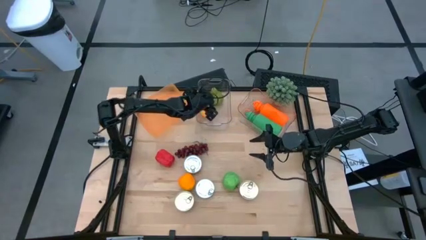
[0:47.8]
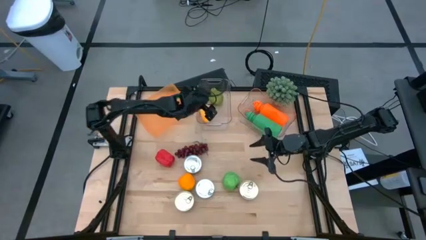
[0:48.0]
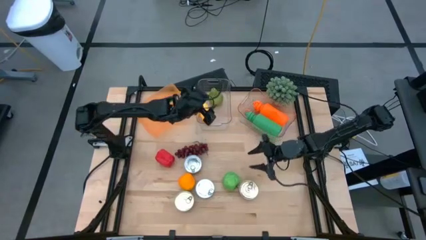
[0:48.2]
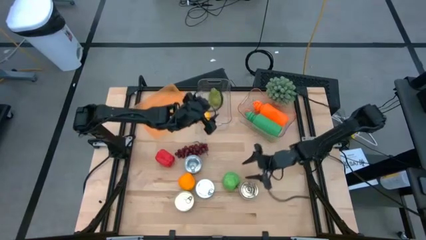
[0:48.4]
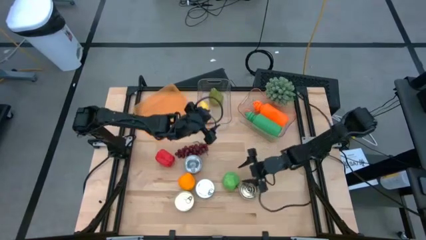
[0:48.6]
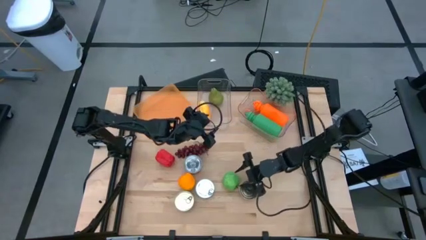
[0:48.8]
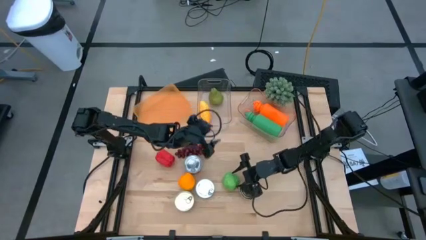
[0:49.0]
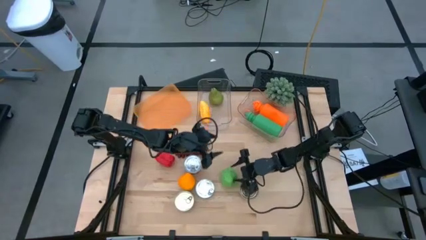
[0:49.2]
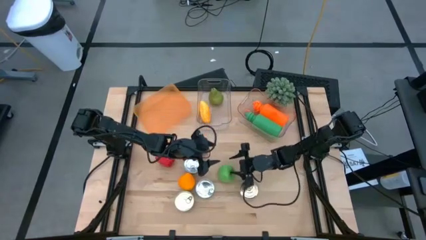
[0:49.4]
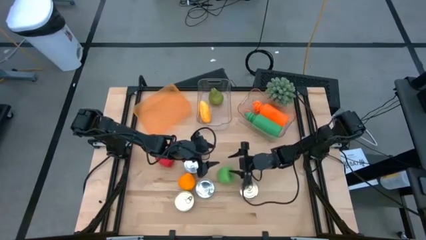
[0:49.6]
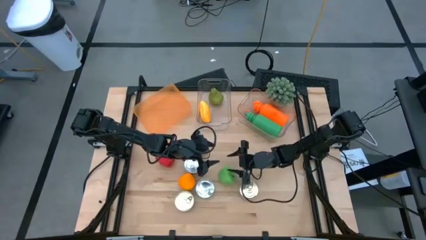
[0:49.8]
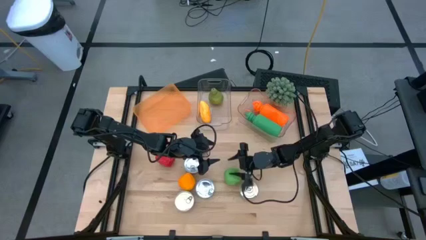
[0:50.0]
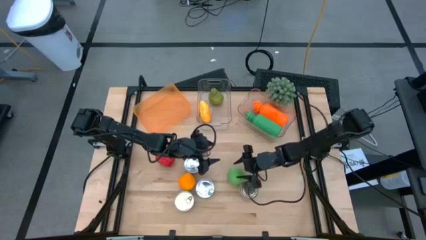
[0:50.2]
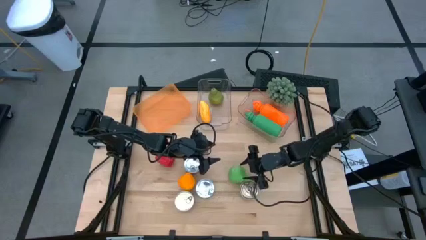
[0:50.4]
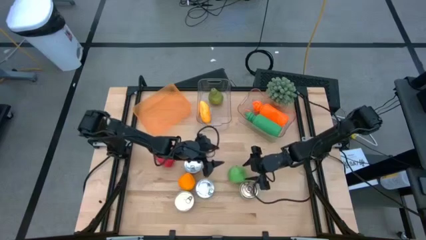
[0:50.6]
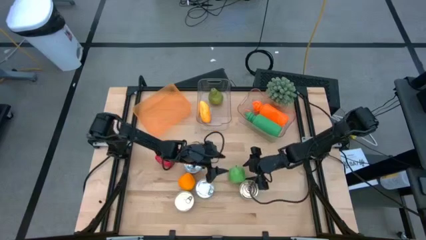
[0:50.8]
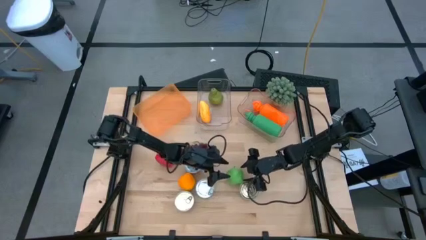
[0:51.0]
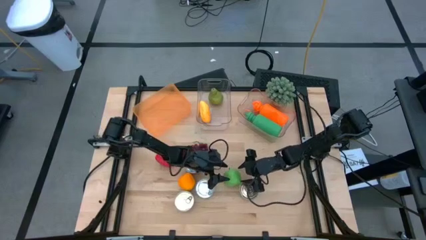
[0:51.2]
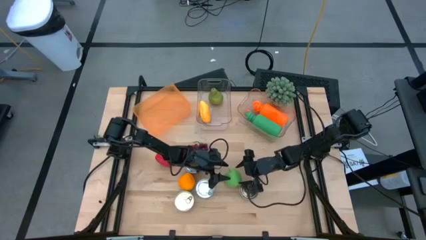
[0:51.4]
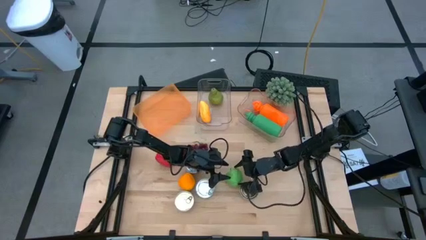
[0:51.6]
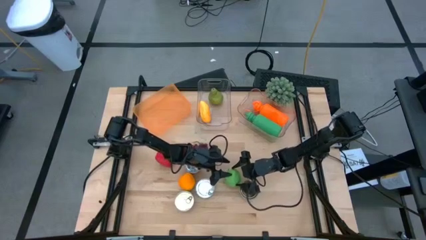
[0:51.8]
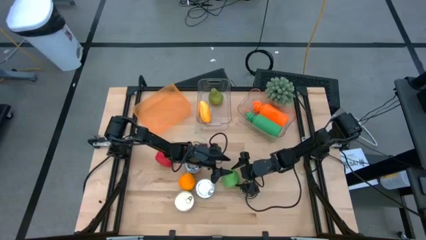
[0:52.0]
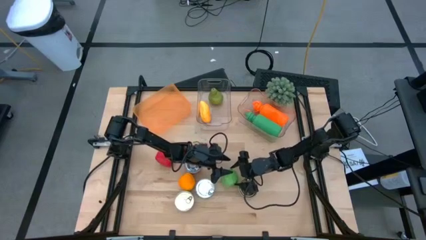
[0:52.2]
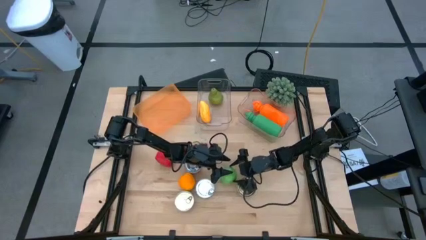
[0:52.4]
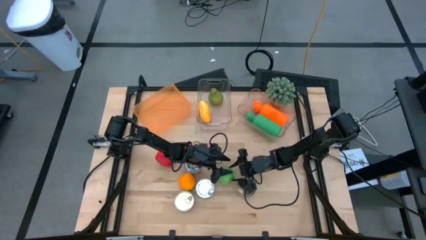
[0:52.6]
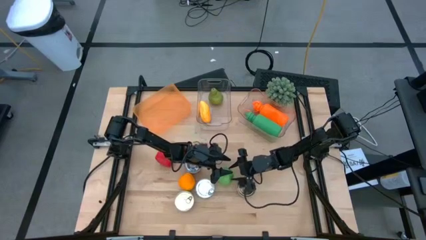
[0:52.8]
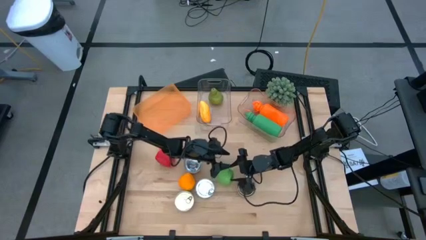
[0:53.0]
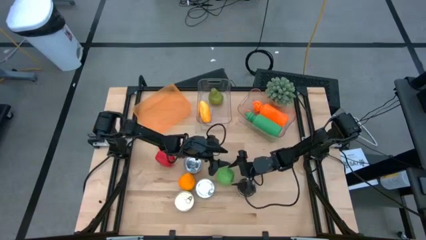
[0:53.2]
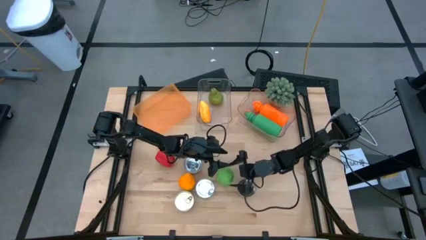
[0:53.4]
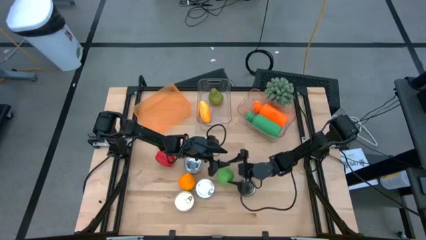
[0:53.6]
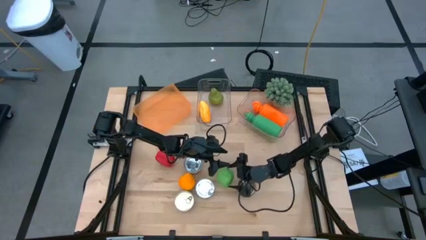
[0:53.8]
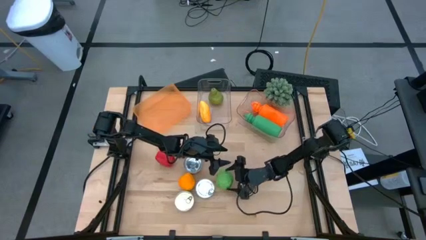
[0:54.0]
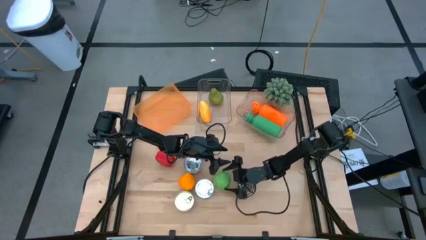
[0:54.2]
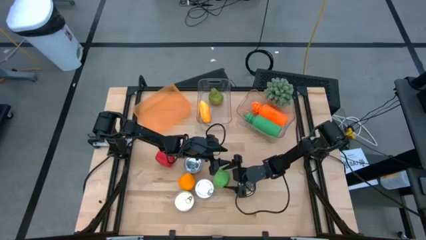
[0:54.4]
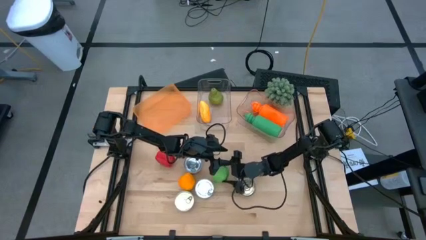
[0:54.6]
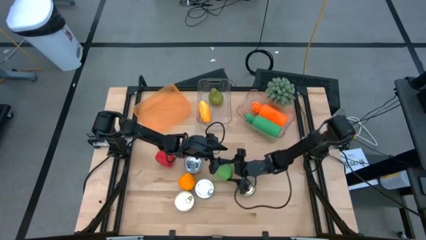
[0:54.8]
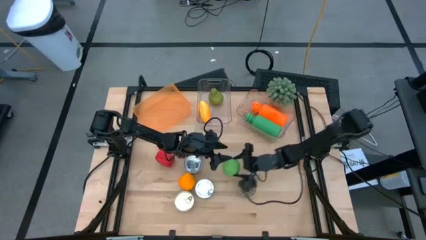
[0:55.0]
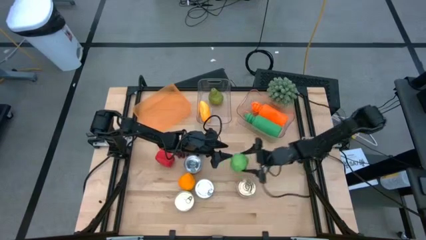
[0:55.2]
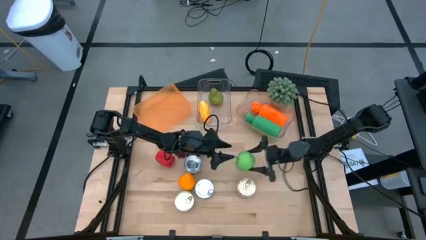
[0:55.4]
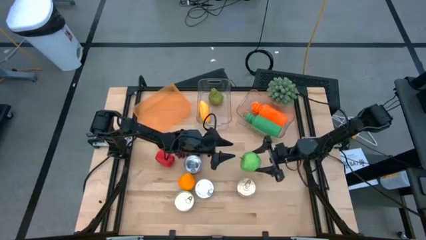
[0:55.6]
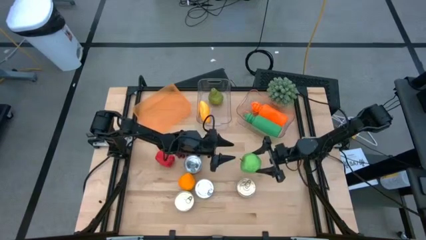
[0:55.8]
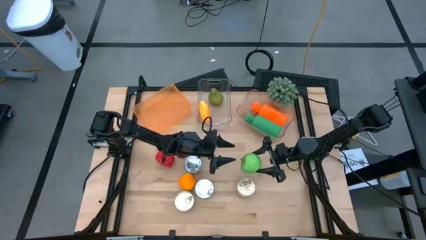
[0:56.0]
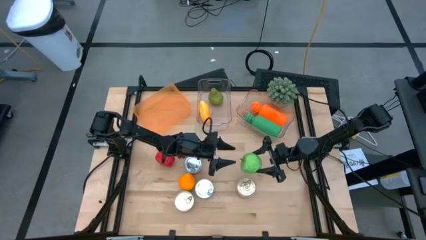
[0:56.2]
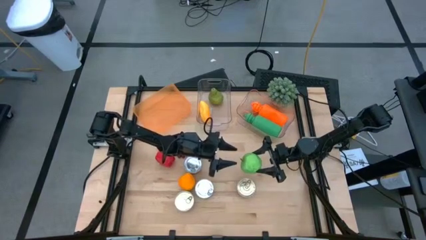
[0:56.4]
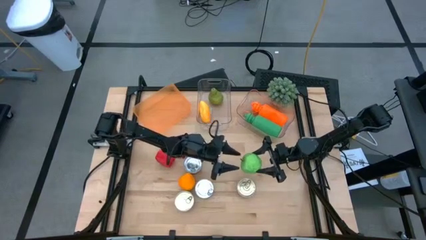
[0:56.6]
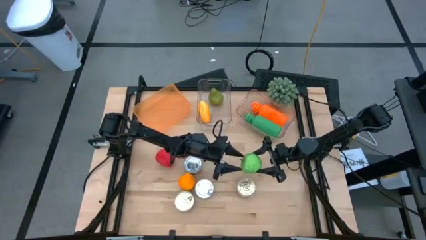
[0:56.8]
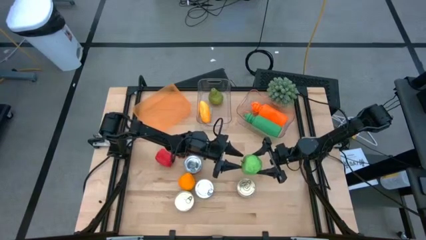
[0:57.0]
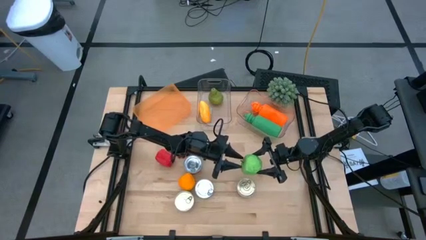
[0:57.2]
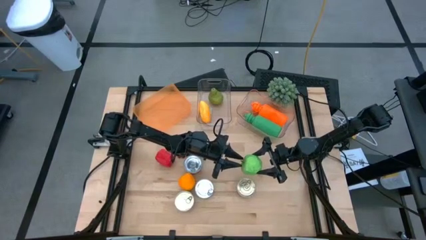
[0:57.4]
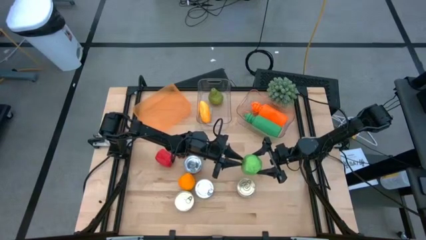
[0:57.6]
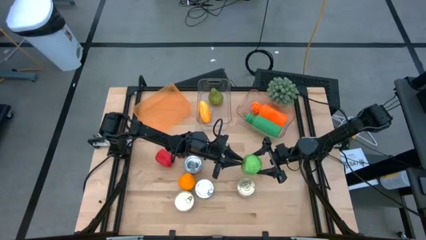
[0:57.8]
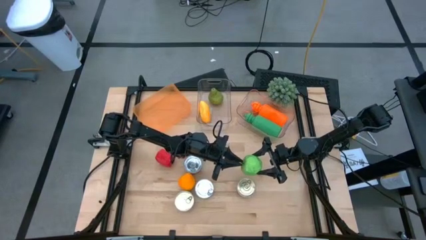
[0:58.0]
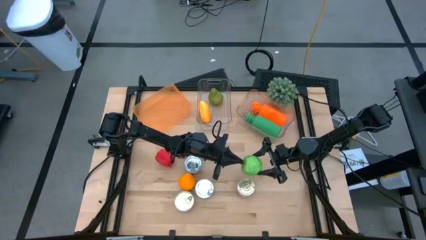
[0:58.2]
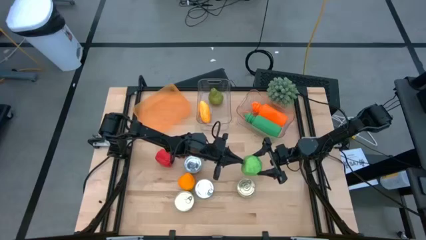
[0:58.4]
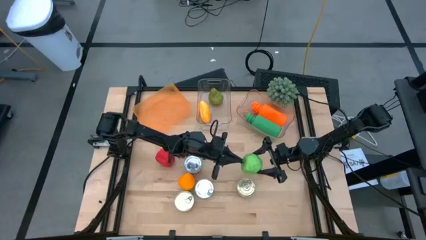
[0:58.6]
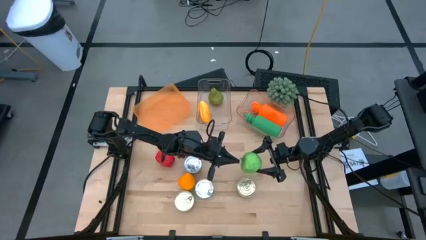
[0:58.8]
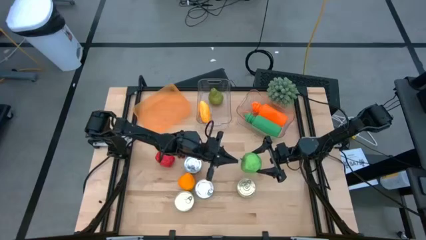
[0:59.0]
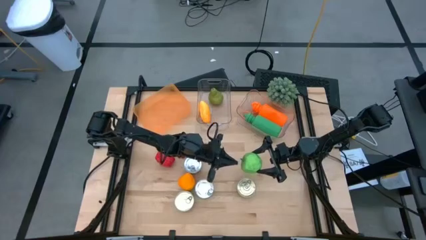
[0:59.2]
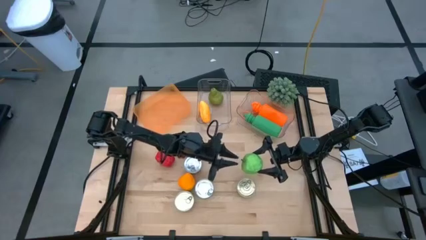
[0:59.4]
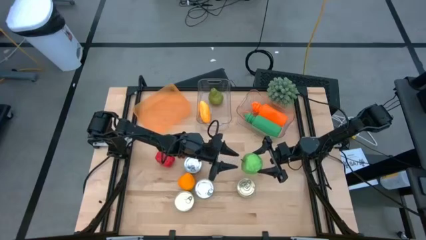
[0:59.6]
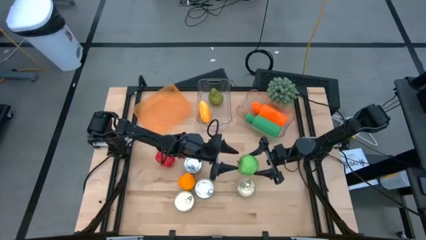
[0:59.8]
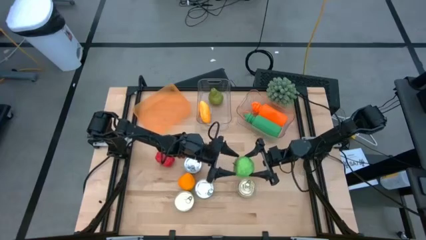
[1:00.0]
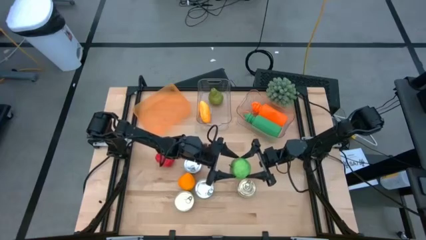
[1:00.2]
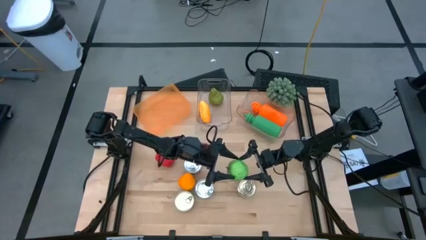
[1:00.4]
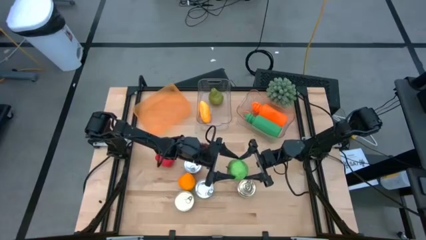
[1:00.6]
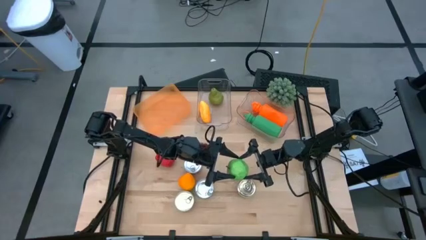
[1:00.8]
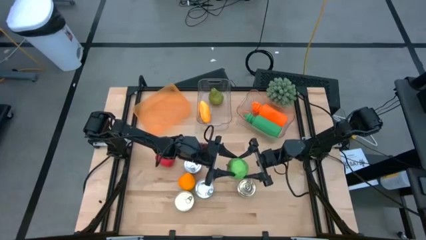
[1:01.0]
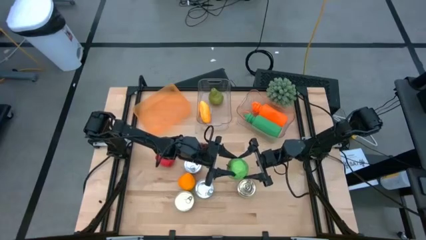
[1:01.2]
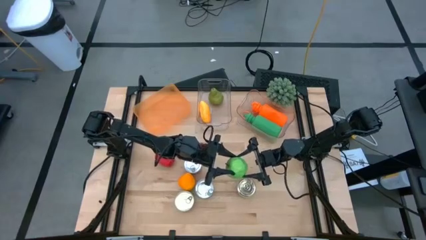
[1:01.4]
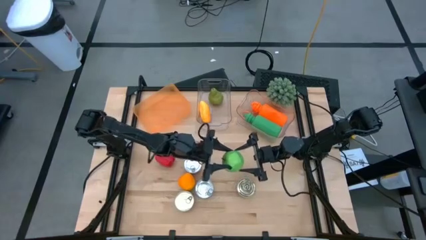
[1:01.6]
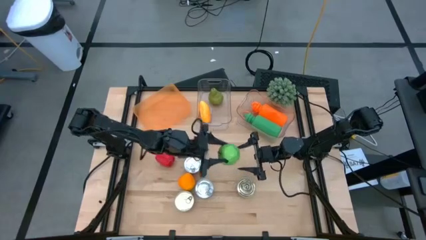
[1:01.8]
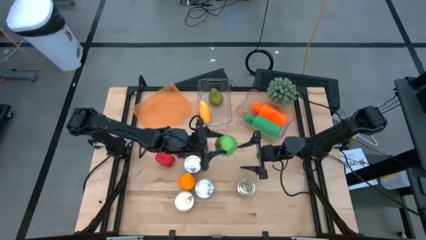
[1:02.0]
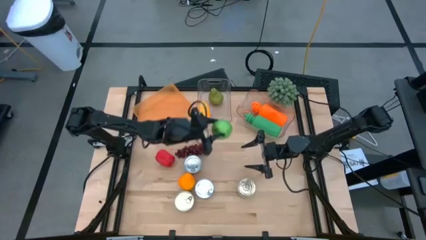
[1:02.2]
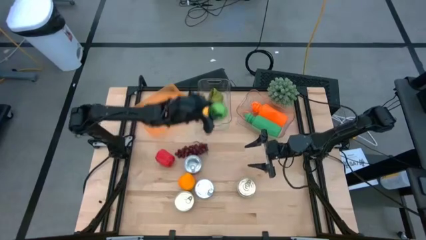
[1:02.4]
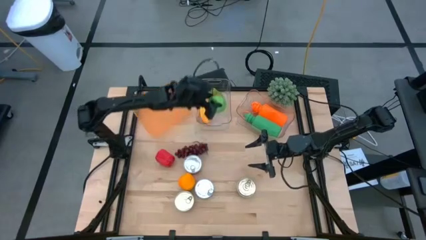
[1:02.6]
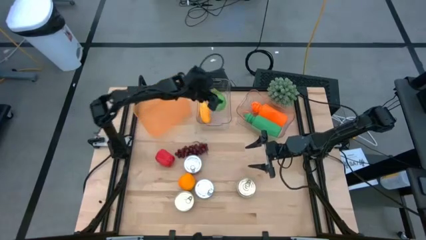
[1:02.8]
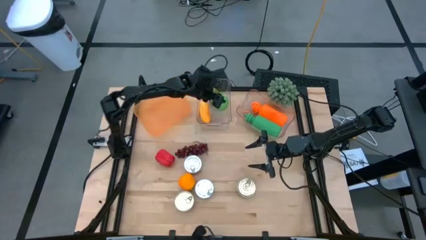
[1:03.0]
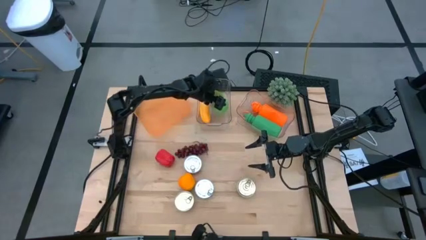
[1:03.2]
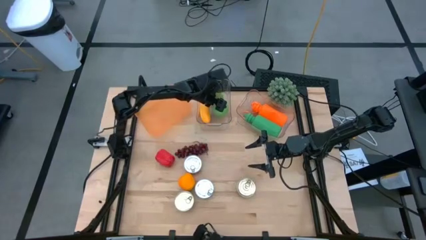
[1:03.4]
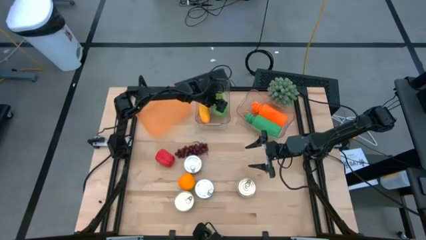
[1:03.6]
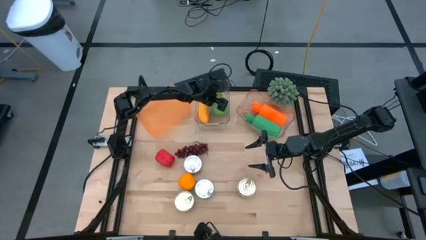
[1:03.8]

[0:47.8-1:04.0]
Task: Pick & Place Food Item
Put the green apple into the left transparent bin
